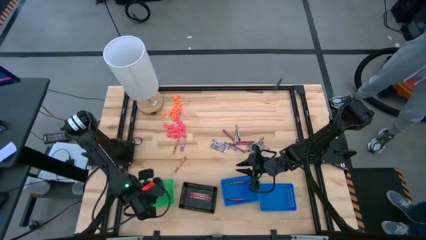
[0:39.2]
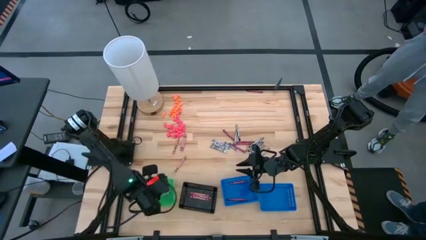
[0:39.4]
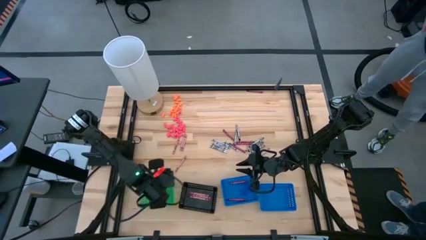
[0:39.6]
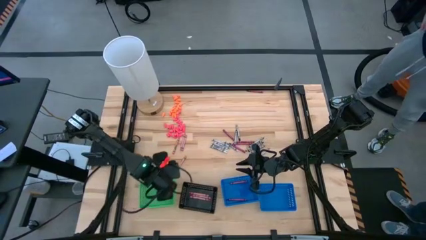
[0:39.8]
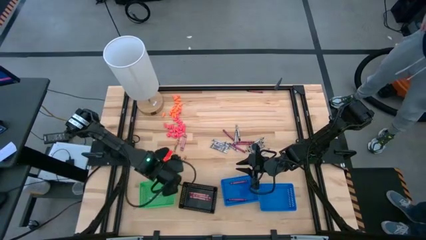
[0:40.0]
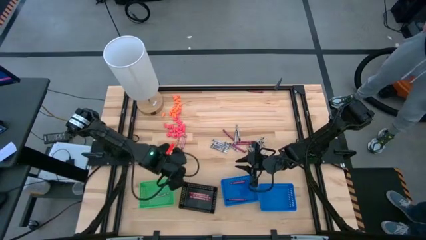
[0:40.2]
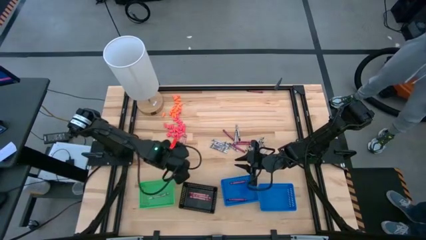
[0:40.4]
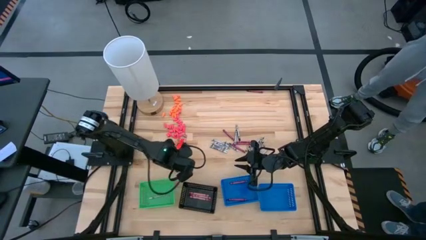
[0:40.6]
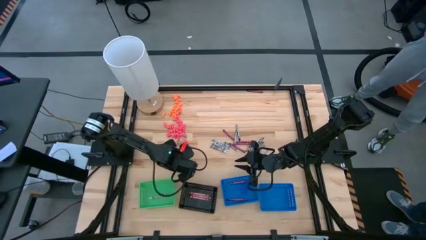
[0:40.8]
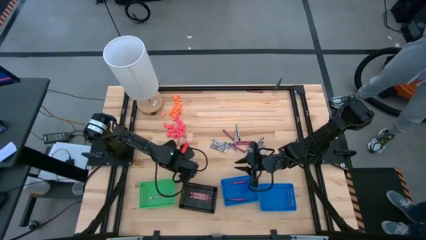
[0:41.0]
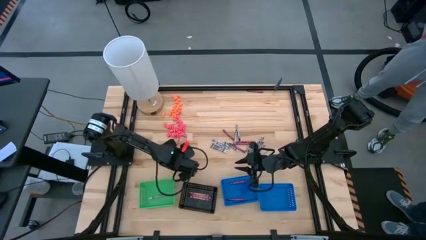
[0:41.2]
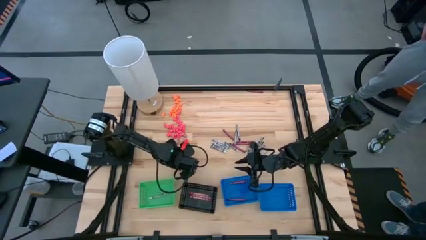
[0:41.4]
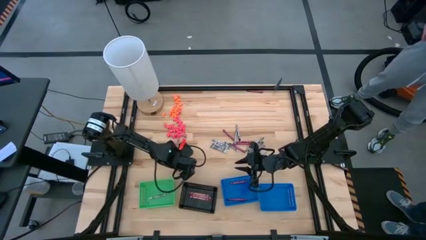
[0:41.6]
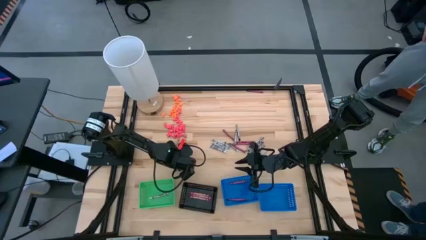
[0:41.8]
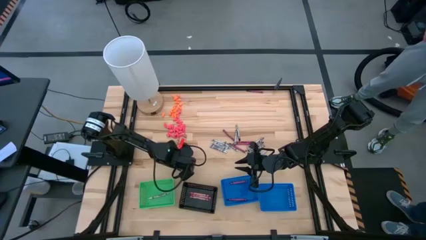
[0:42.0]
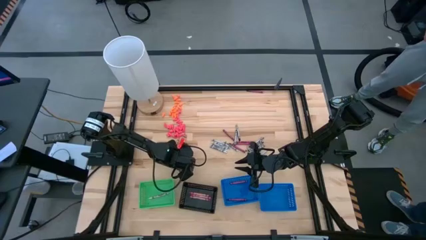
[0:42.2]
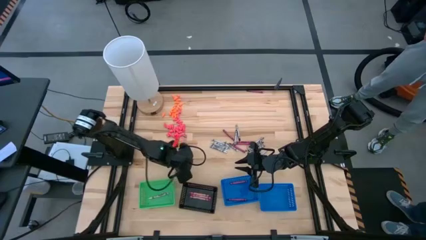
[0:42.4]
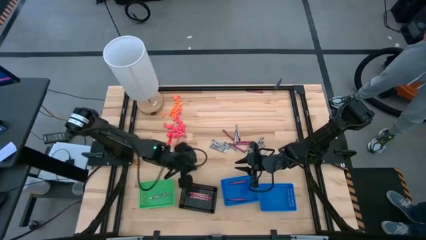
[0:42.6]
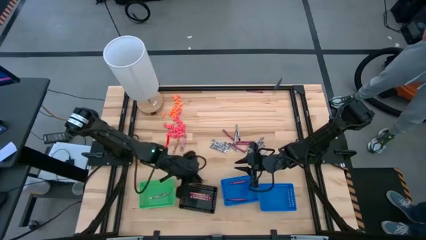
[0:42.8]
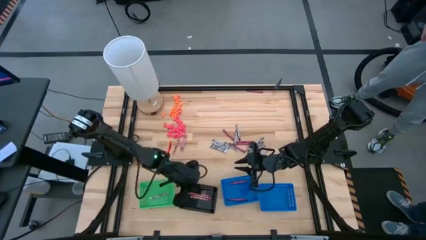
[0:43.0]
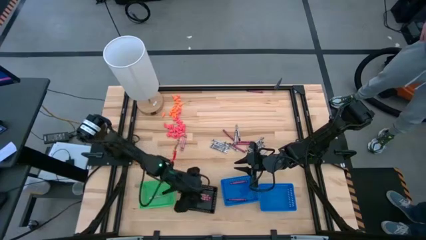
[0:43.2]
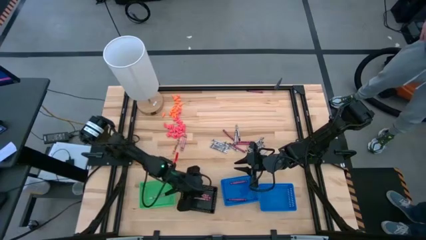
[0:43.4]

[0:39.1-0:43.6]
Task: Sort crayons
Put the pink crayon into the black bin

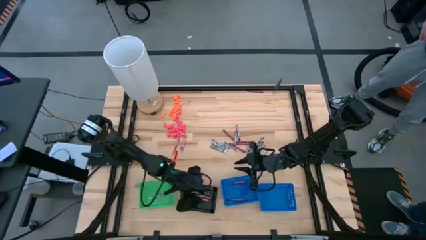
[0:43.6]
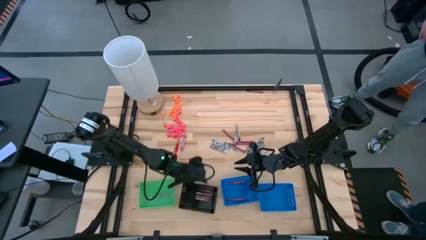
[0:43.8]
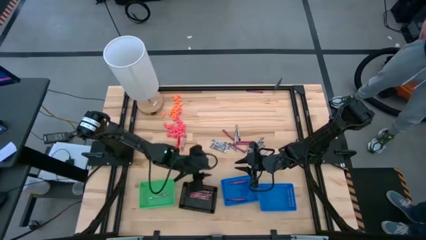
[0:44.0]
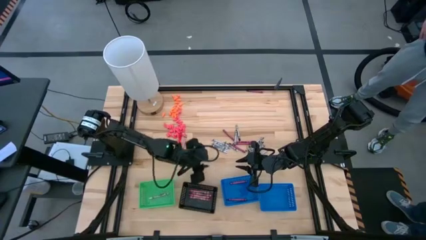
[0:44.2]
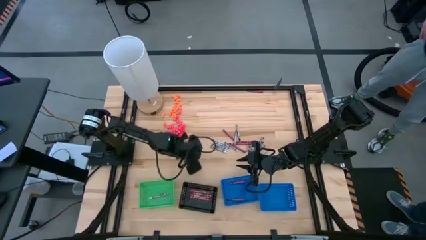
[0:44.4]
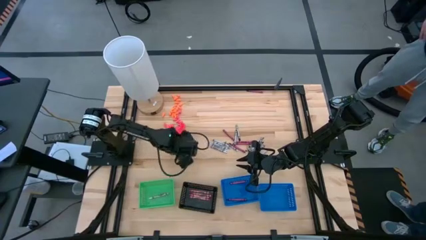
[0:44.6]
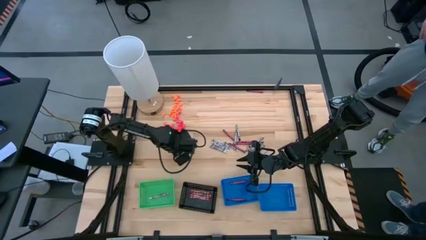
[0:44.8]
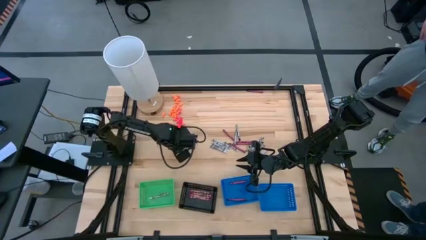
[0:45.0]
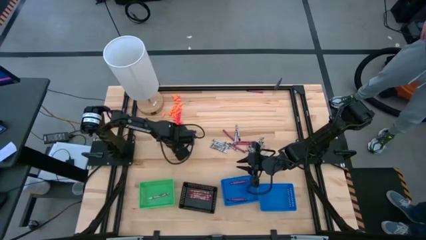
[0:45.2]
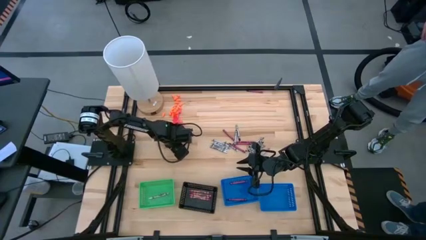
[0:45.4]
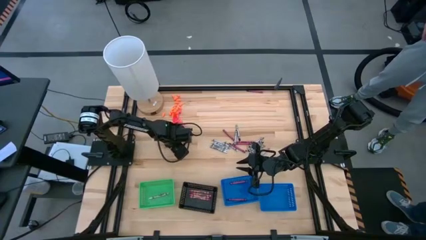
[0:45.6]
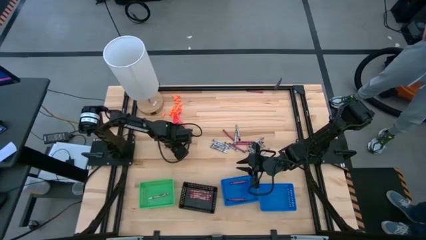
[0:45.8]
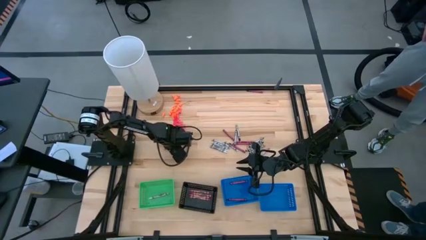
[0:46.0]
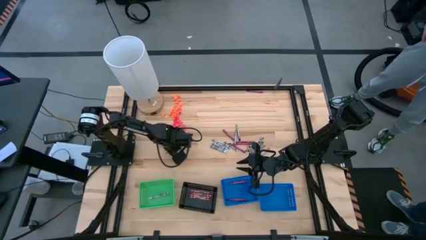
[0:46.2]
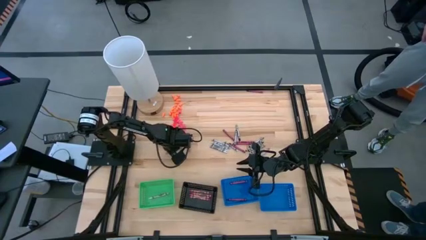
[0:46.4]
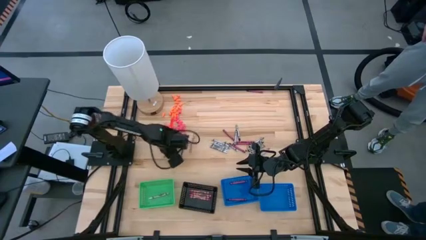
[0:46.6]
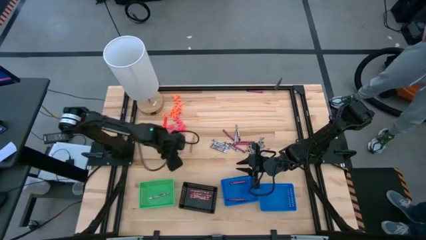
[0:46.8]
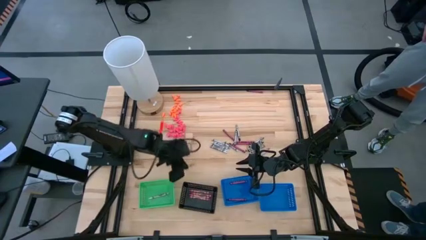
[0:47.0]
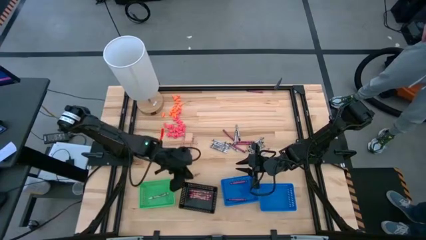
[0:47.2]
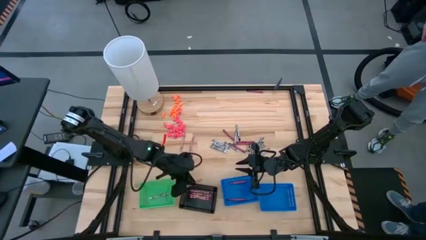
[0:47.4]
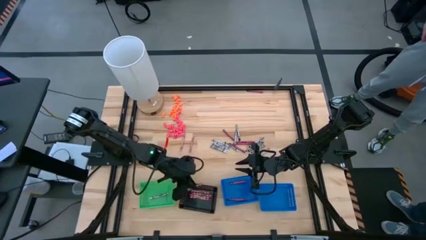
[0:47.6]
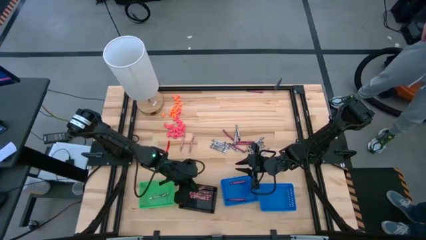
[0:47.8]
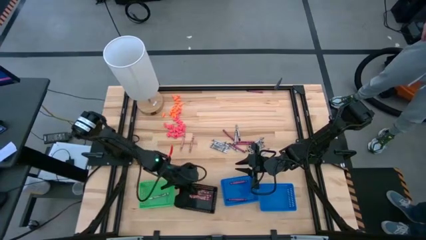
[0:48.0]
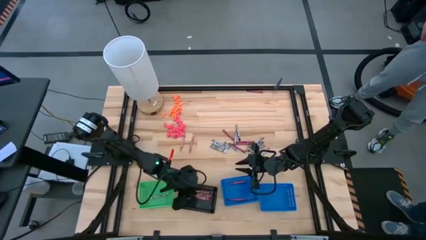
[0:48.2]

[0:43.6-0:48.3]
Put the pink crayon into the black bin

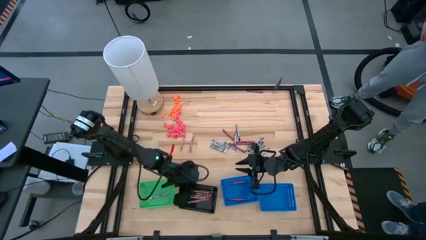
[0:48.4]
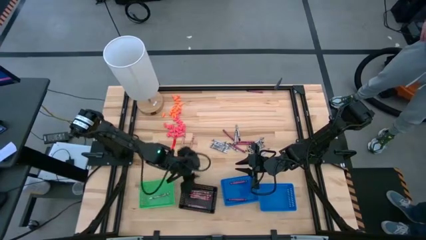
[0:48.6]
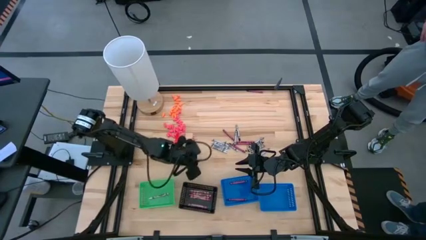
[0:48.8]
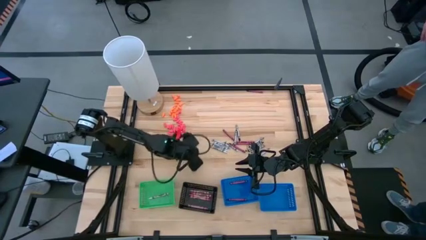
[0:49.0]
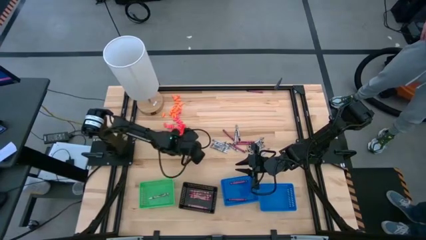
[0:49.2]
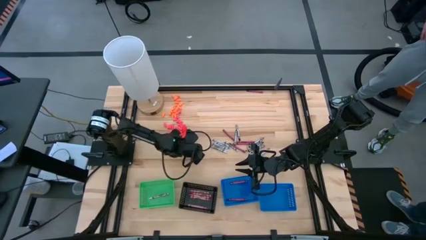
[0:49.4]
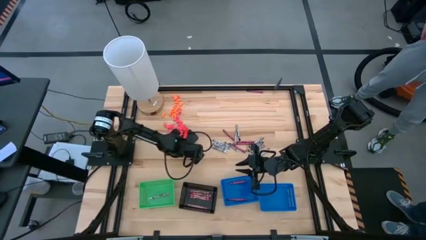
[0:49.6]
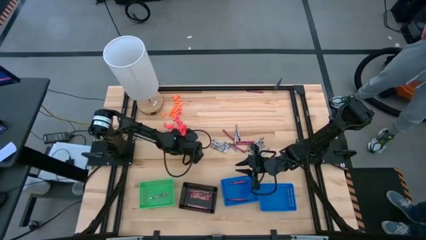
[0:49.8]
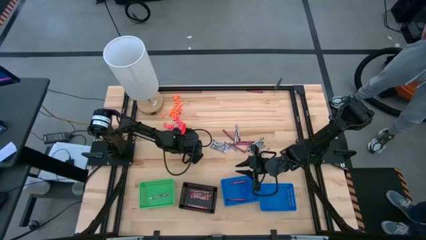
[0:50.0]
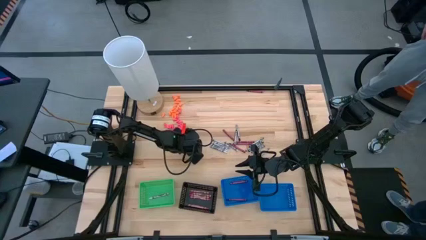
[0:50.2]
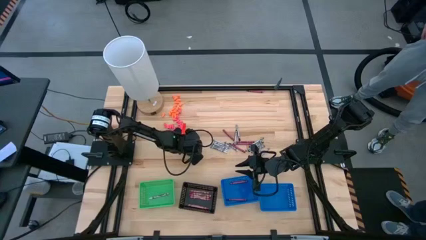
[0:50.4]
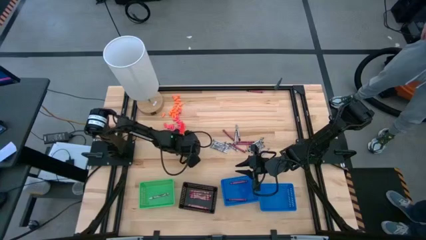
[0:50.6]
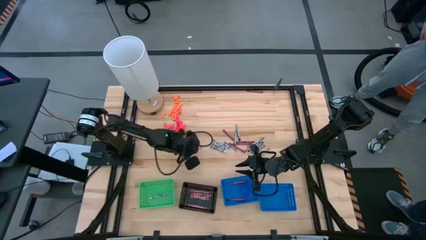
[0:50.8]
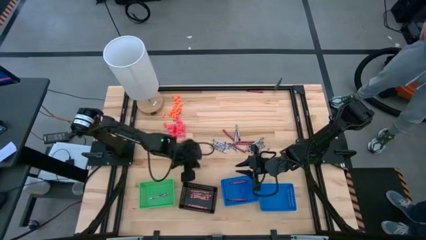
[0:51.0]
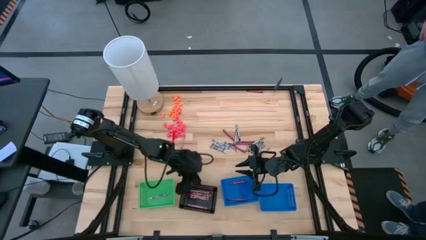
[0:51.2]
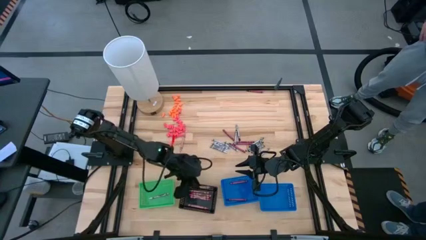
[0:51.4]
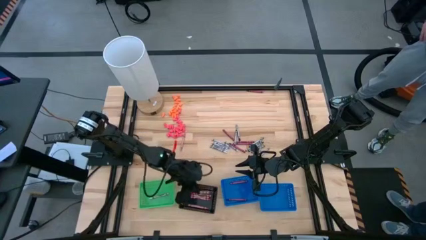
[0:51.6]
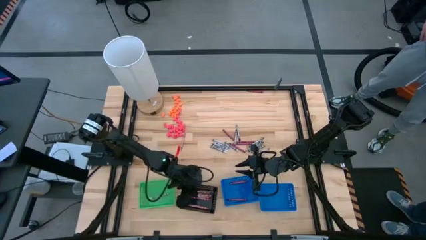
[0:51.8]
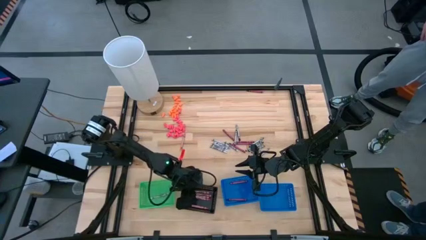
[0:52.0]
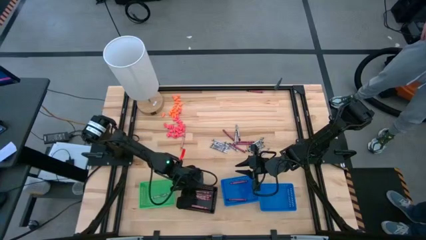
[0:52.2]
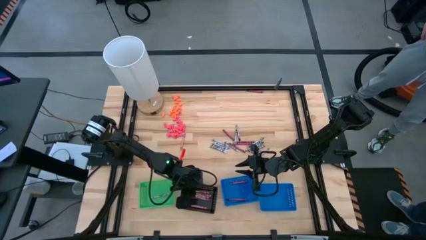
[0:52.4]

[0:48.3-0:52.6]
Put the pink crayon into the black bin

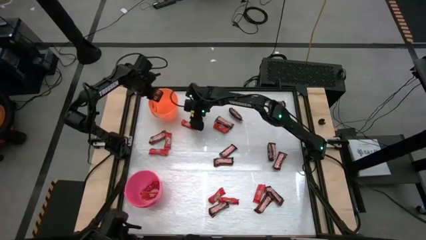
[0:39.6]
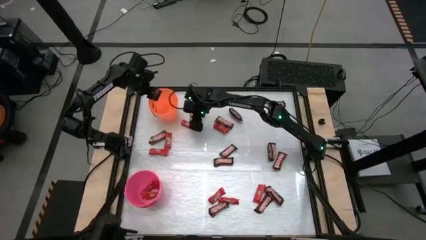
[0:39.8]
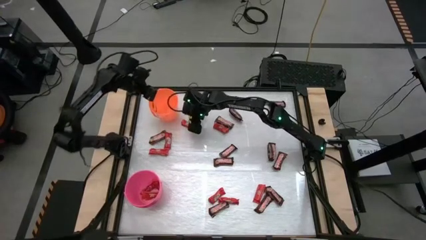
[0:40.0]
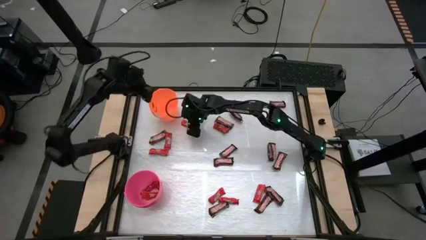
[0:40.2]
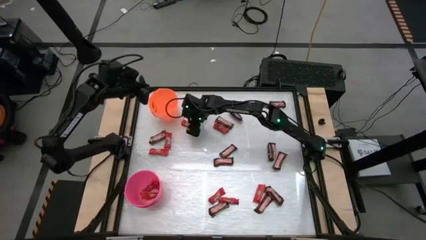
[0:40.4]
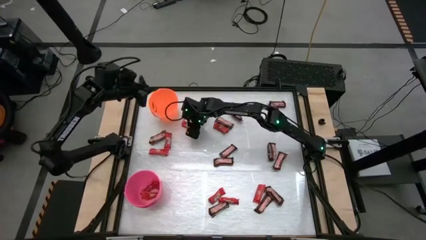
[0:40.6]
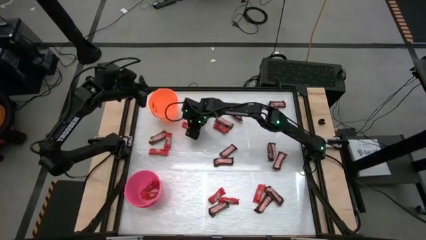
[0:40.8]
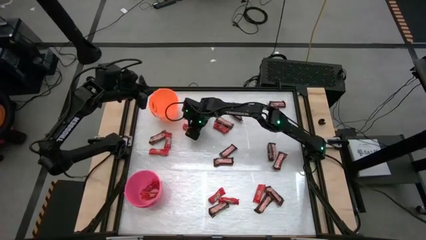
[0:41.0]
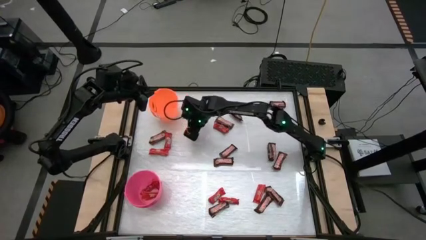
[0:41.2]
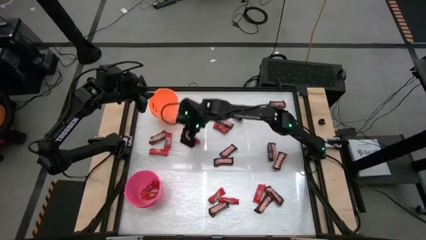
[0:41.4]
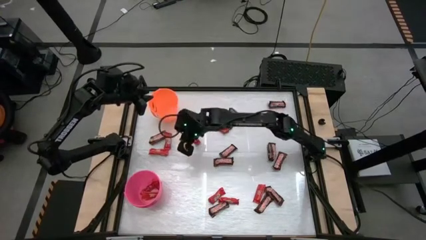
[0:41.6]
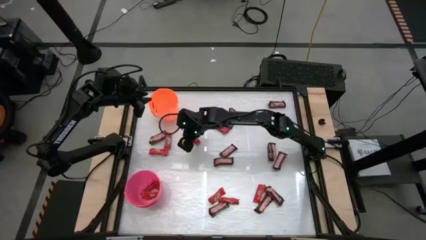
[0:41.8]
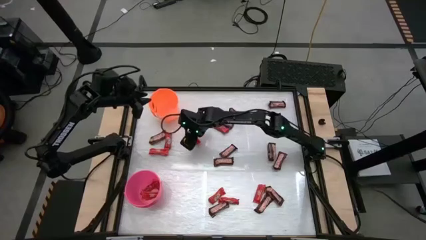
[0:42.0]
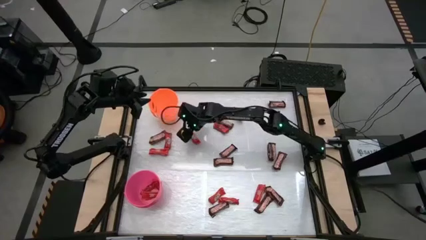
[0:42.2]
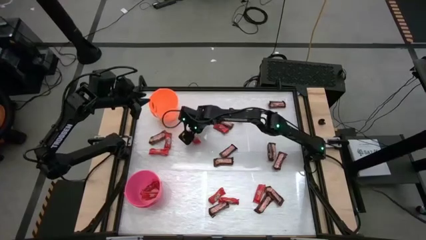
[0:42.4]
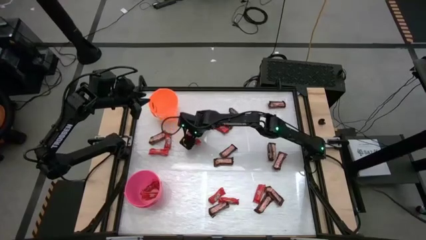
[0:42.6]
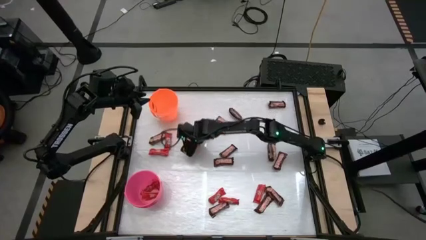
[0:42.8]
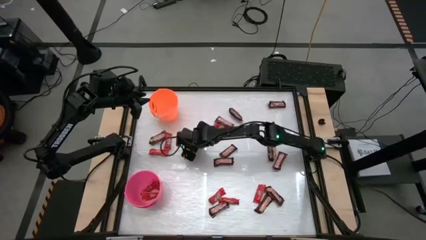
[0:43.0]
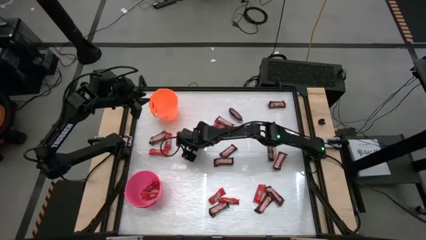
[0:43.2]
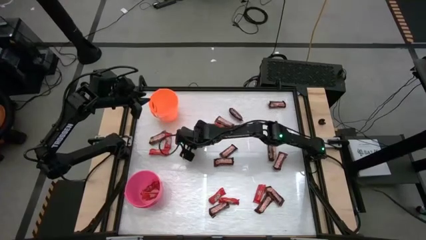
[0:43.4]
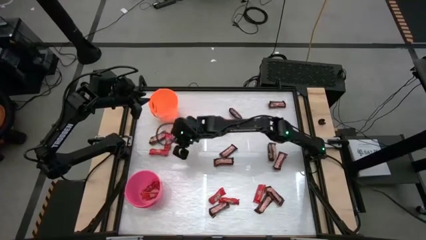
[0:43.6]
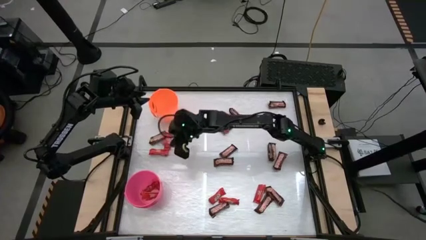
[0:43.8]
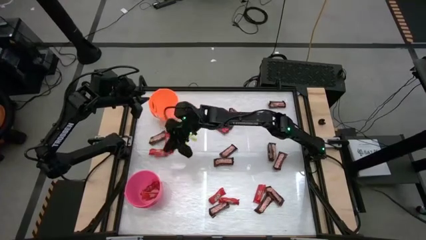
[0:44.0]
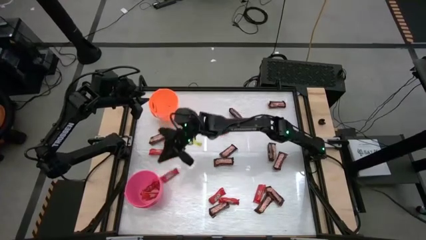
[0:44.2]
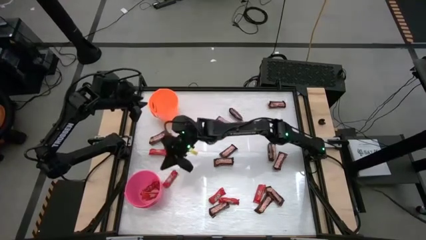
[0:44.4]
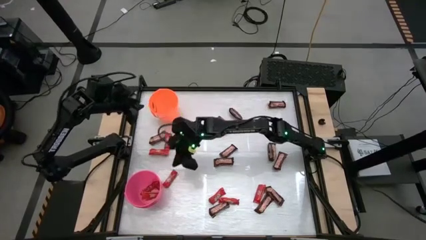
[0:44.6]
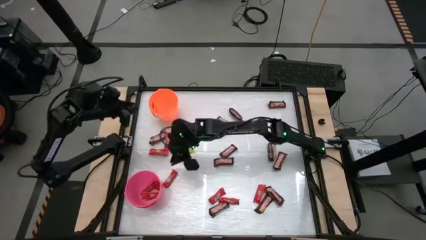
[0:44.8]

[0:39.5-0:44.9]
Task: Sort candy by brand, put in halloween buckets
Put the red chocolate bar into the pink bucket
